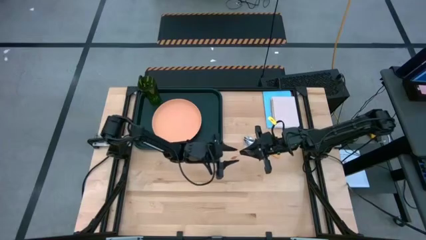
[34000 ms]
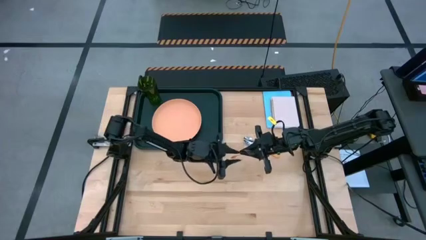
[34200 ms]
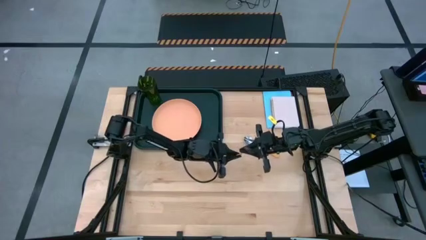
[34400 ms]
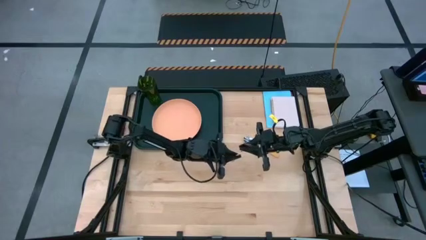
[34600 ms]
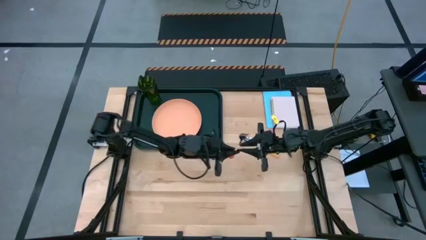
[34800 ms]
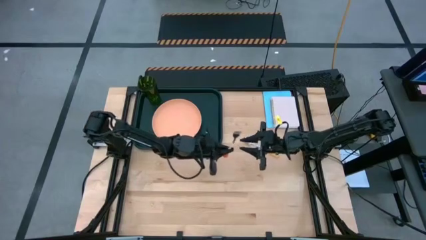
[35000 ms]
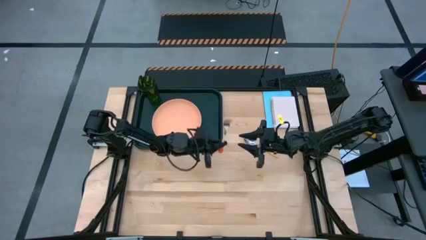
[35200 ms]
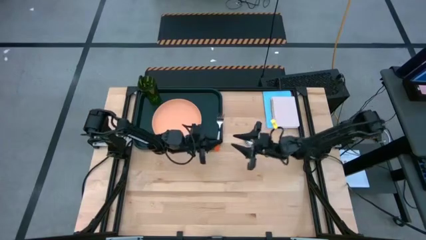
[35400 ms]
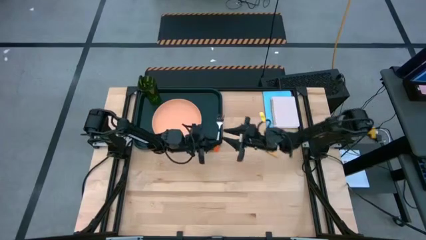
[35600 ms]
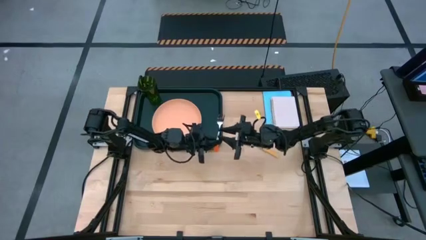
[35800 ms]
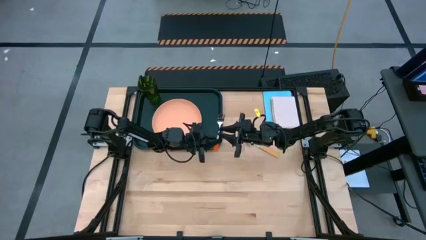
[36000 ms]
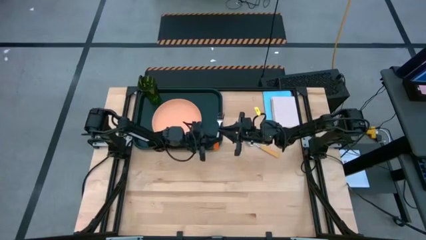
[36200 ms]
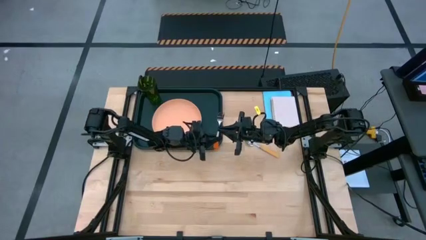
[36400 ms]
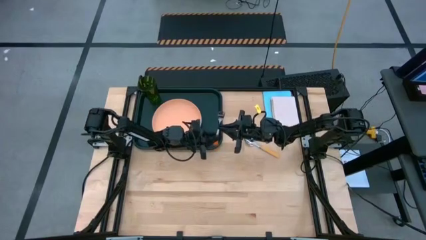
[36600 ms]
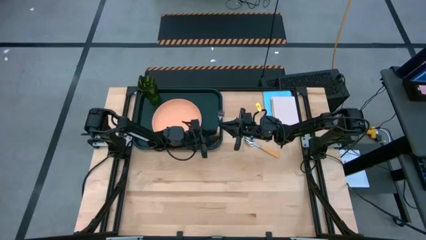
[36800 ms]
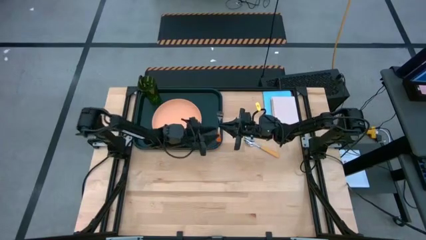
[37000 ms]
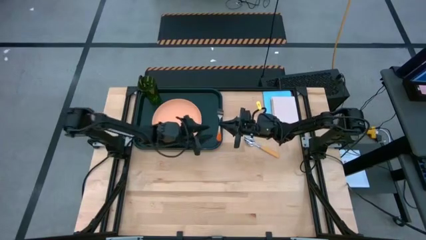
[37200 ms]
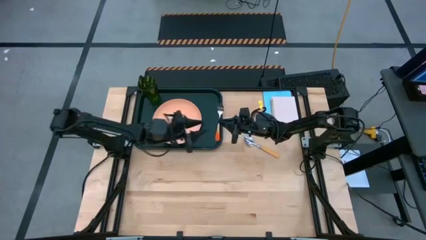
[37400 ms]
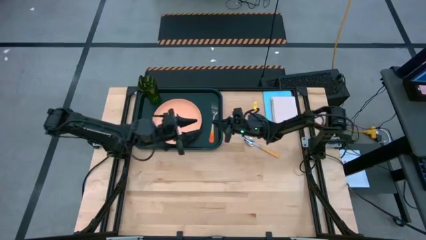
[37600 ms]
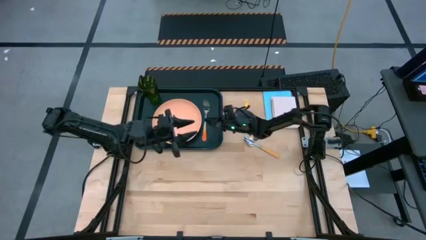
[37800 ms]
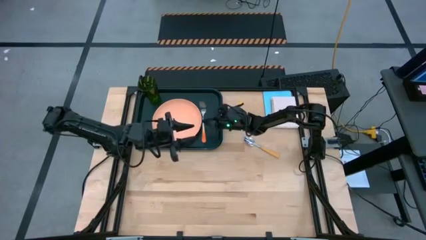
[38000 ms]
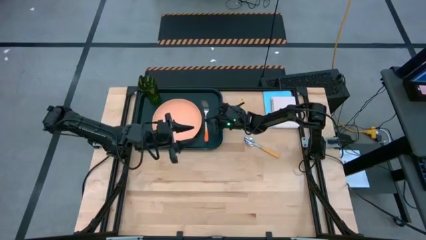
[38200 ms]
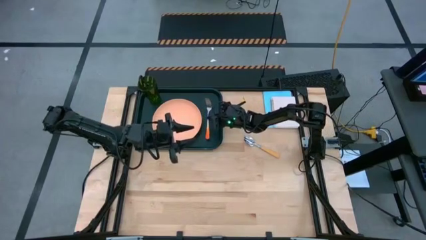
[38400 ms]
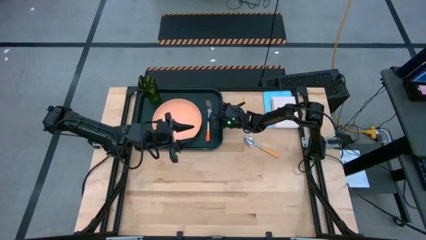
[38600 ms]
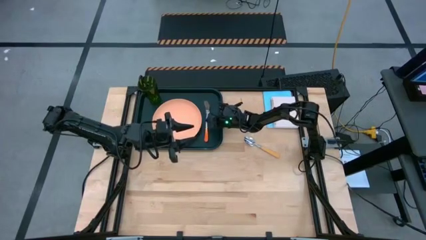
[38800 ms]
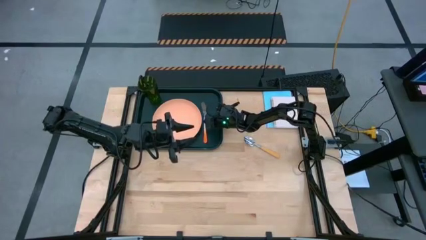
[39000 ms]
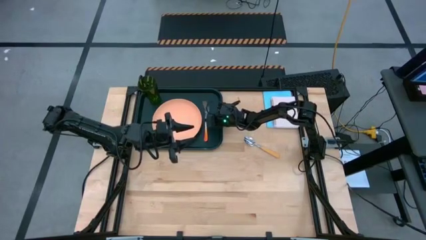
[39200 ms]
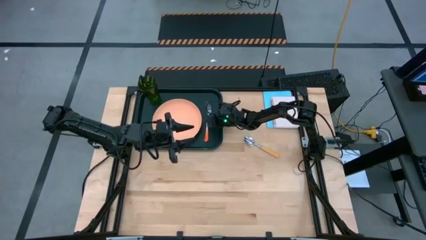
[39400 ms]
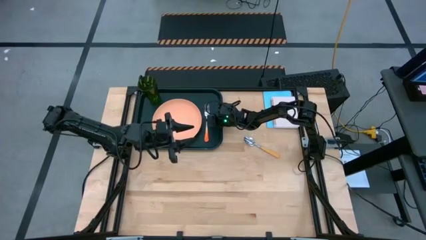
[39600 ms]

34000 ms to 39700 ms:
Task: Pick and place plate/cup/fork/spoon on tray
Put the orange fork on the black table tray to the right of the orange plate

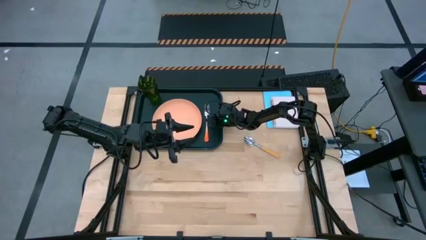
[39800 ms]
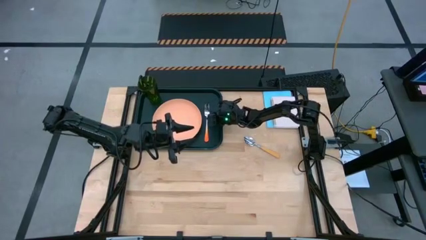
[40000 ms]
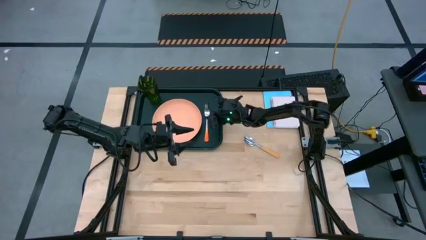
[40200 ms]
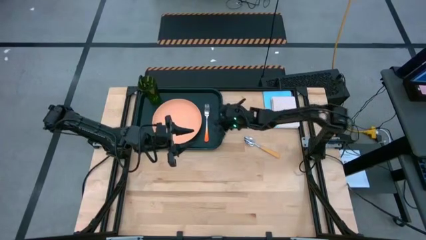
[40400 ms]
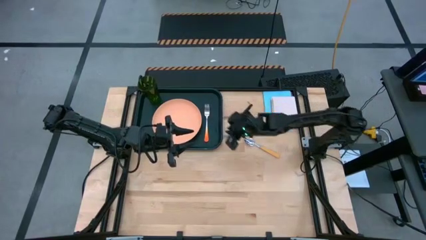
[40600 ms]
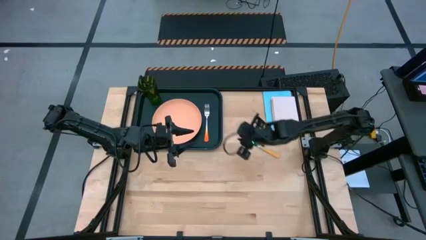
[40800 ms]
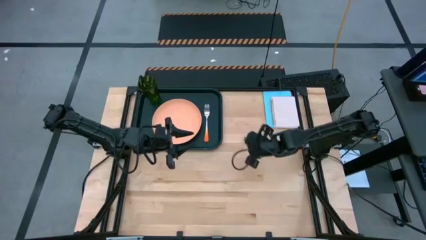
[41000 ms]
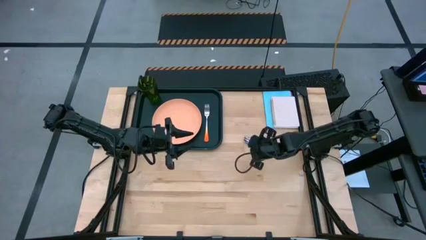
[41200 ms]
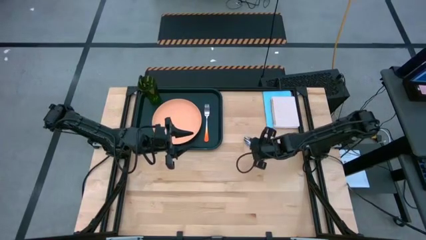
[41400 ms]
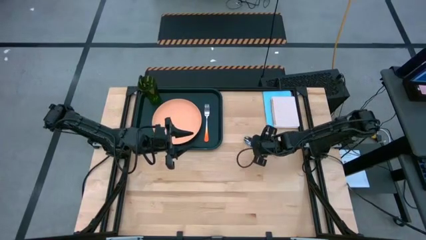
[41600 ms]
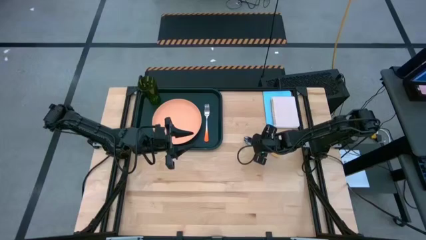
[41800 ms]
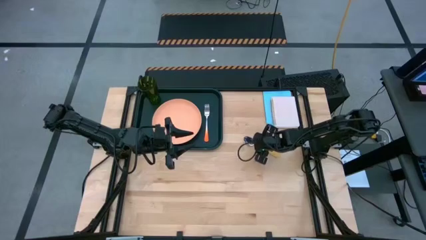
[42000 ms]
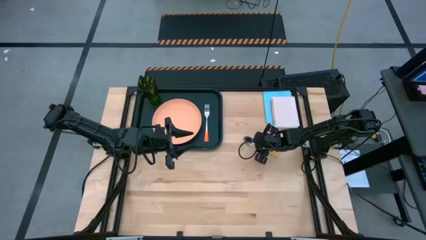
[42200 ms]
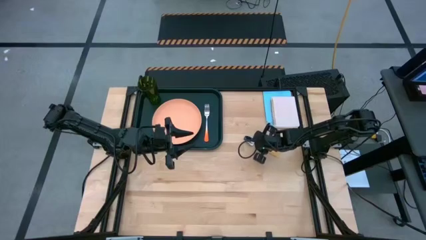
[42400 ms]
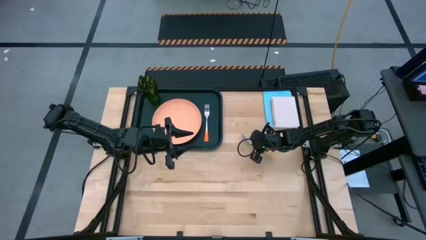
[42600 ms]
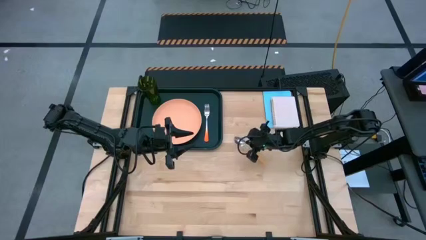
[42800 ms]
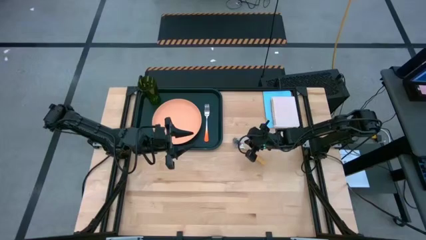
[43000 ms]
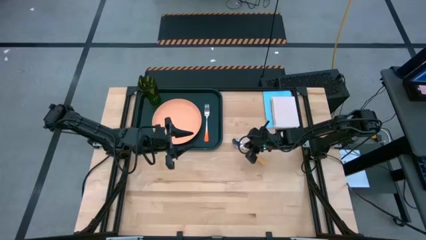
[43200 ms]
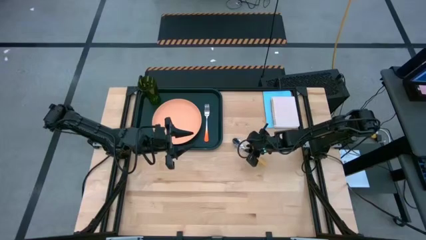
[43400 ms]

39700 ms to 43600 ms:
Put the yellow spoon on the black table tray
